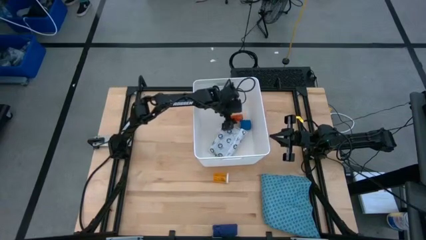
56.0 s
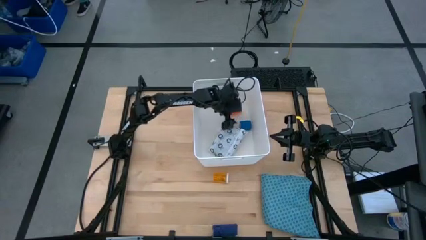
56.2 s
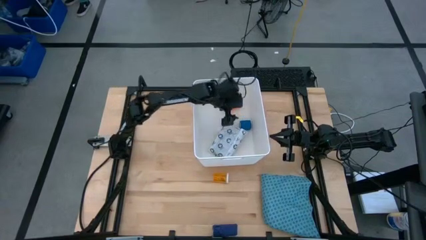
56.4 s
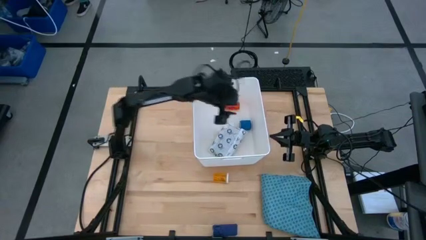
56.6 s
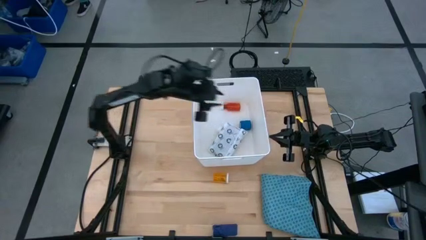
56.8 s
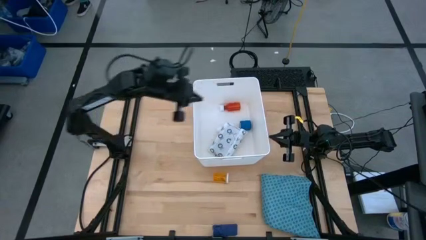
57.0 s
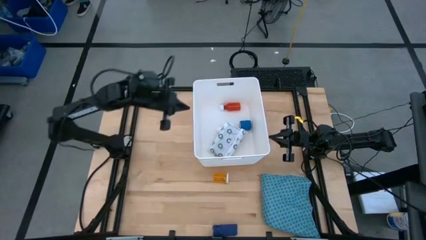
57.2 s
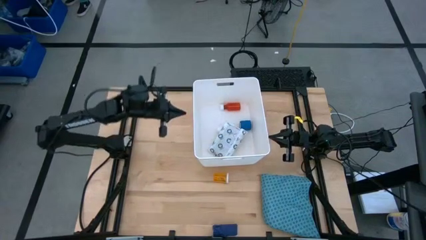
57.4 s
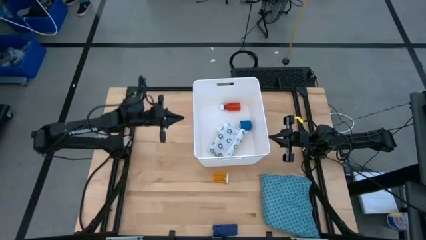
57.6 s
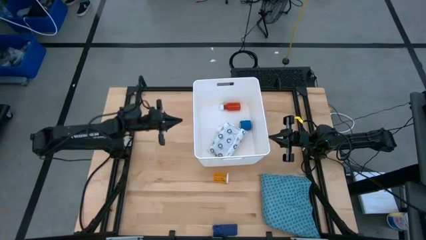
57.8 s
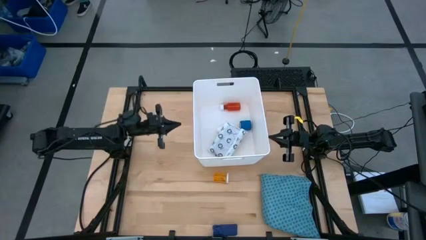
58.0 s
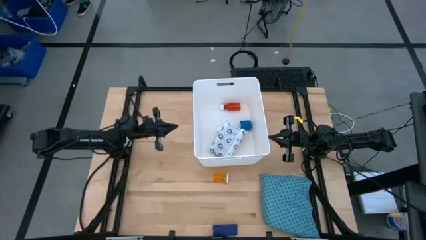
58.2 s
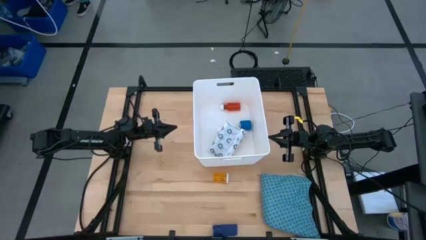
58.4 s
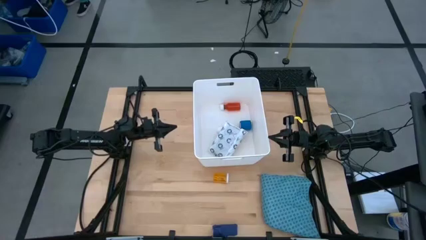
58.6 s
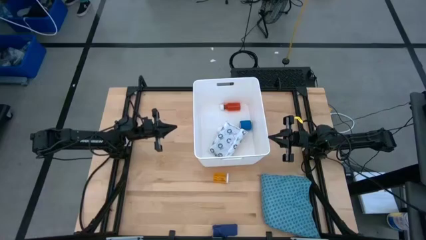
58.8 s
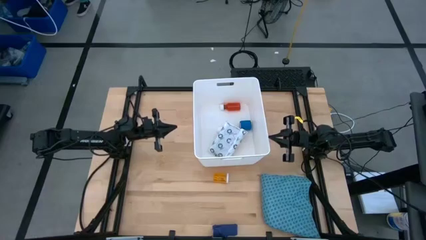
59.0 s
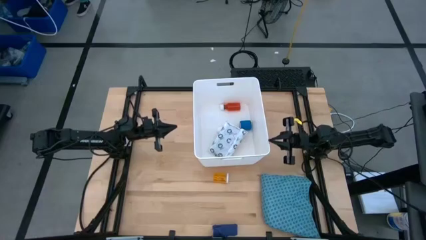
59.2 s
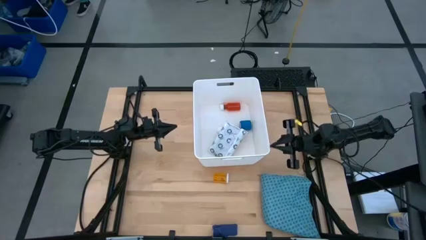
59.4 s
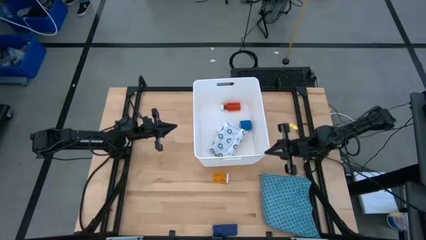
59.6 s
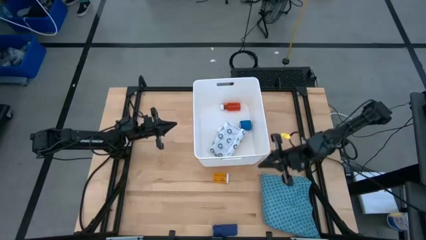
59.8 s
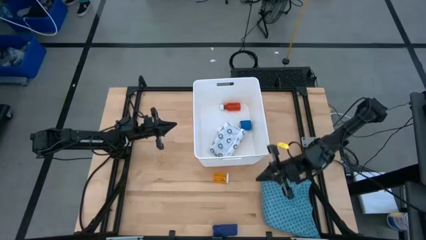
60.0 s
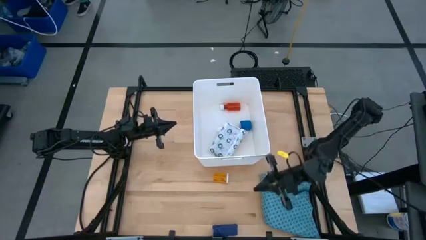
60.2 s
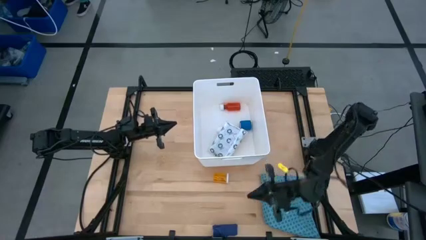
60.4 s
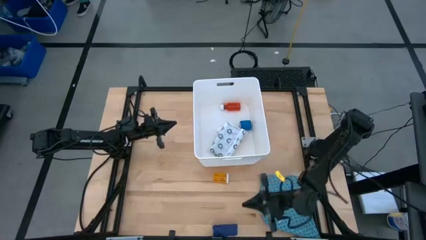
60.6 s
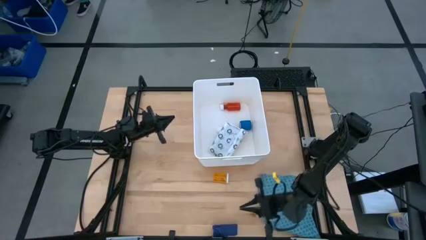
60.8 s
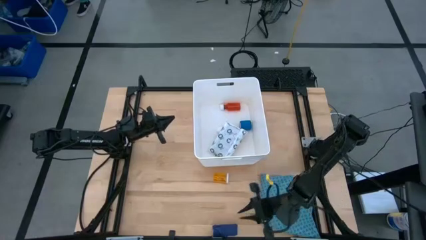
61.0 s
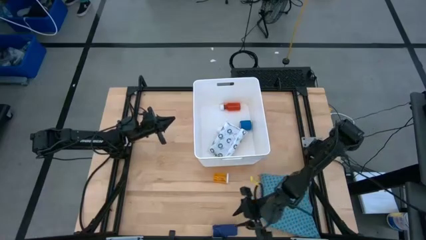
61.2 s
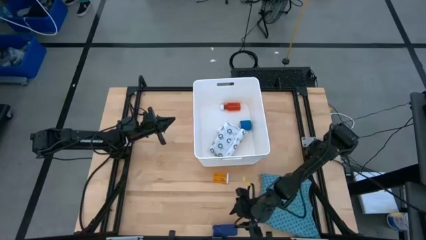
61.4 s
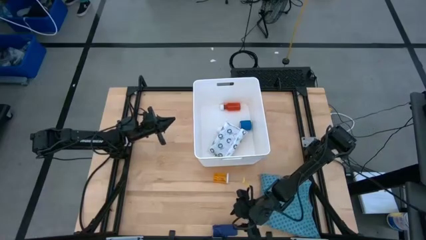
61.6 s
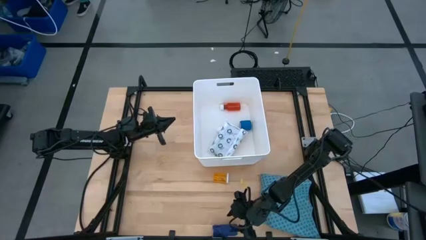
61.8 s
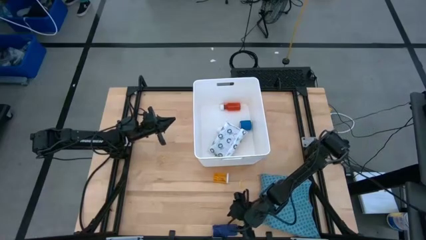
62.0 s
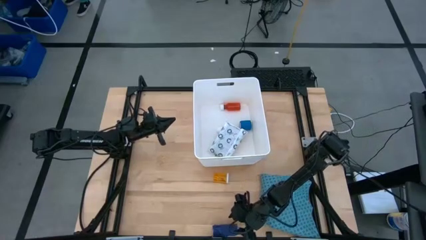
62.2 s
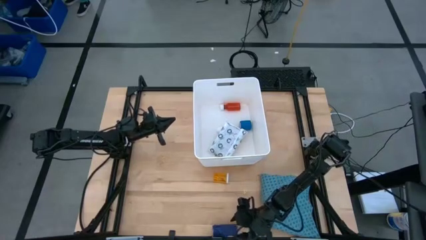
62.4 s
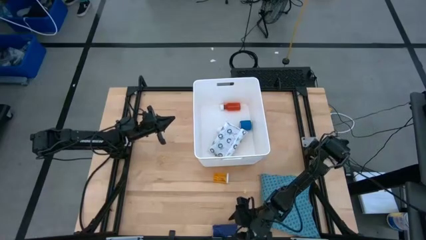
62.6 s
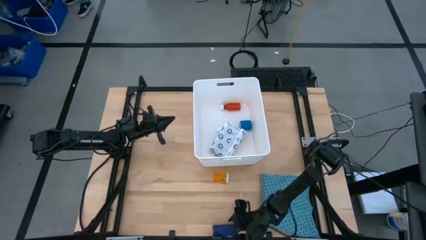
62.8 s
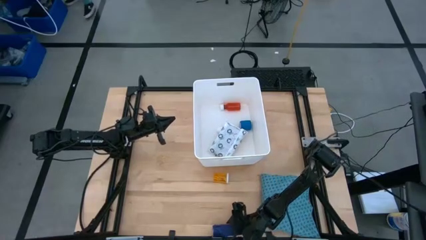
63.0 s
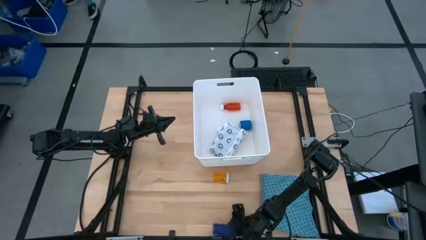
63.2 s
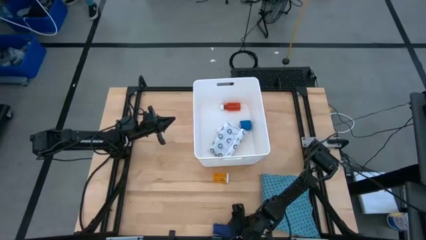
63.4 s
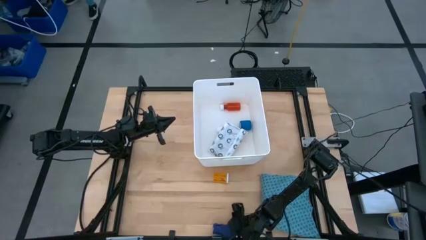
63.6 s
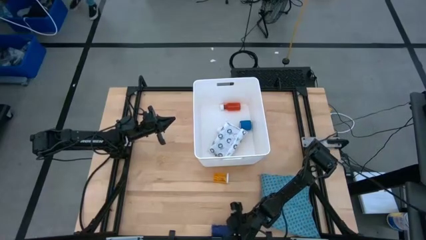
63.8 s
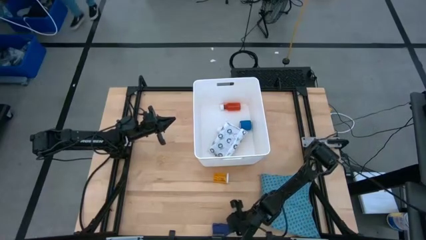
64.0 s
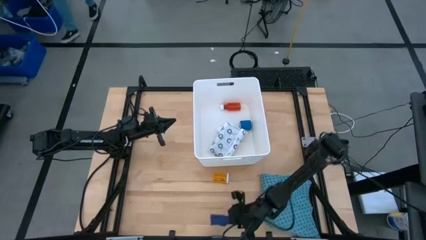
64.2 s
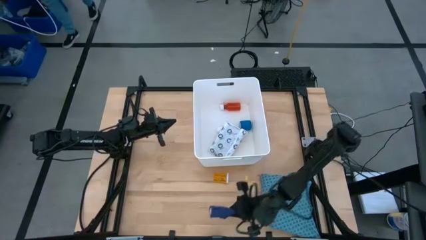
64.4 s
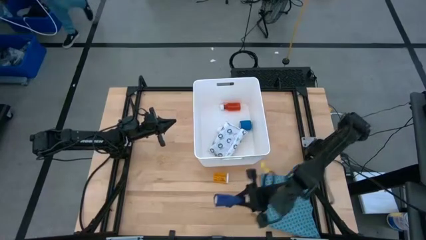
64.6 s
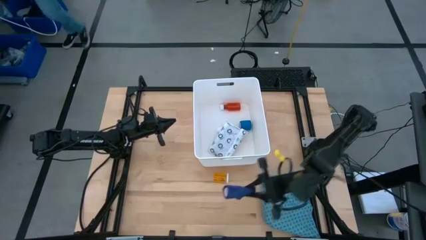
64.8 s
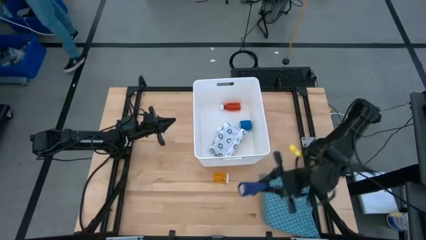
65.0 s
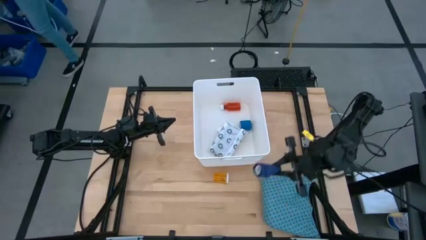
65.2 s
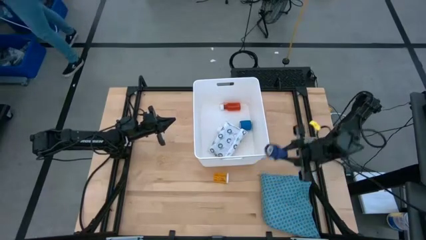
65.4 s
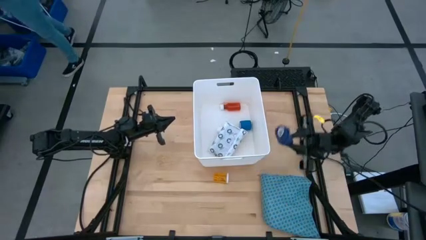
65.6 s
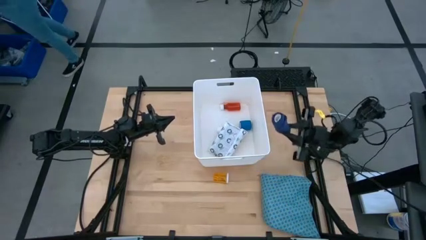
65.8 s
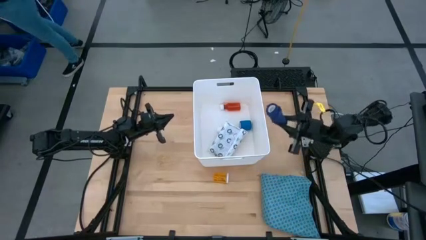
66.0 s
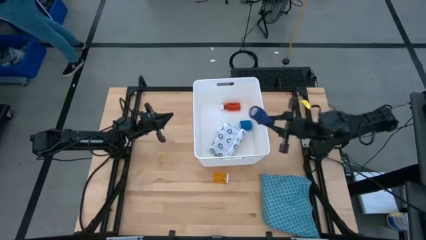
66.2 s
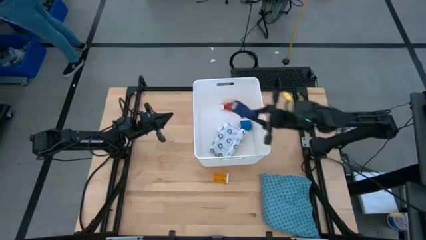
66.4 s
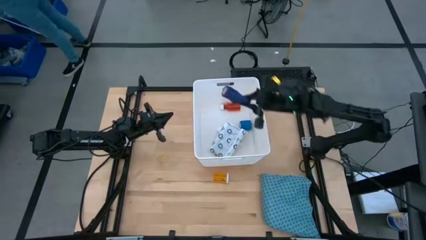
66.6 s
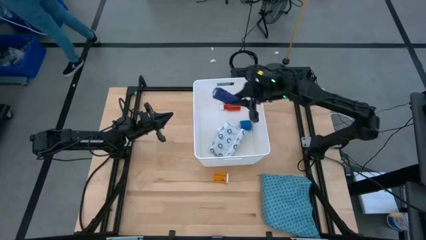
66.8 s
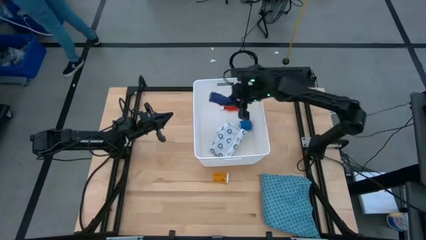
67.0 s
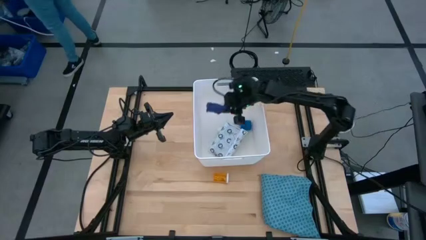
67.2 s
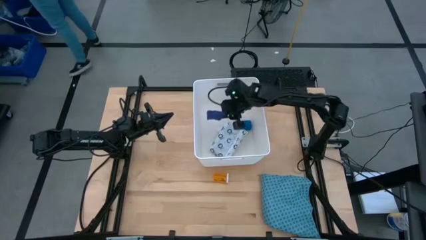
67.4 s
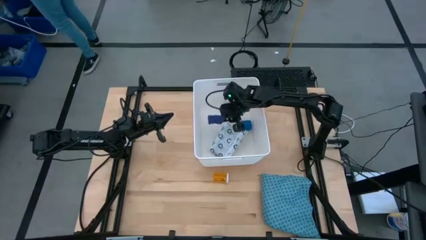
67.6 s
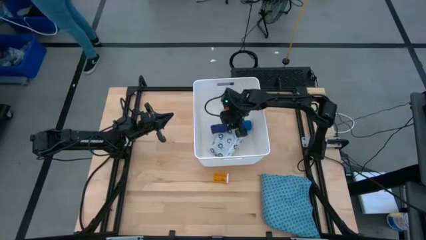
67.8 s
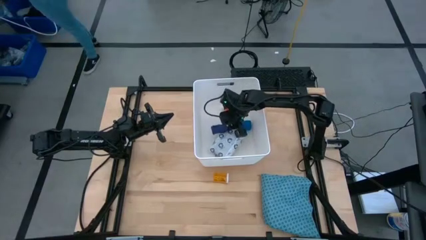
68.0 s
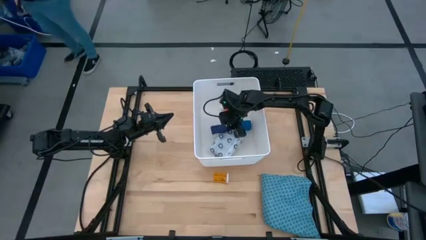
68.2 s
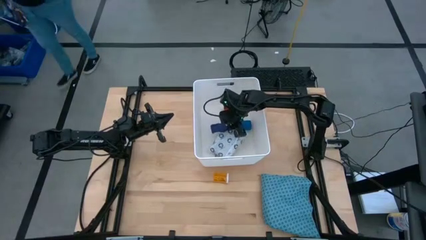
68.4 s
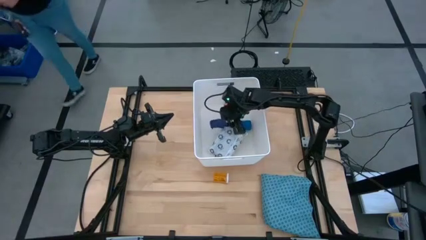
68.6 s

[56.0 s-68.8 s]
Task: Pick & place medical supplies in basket/bin
Put the rolled dark blue bandage into the white container
